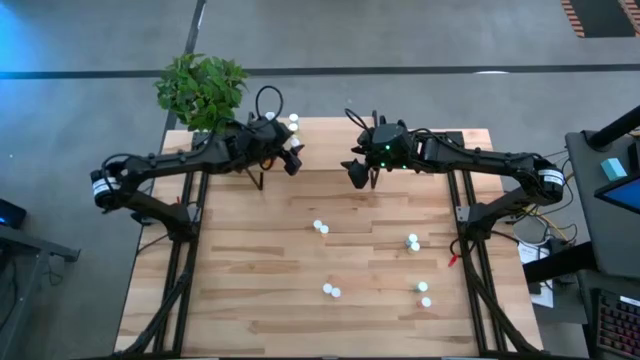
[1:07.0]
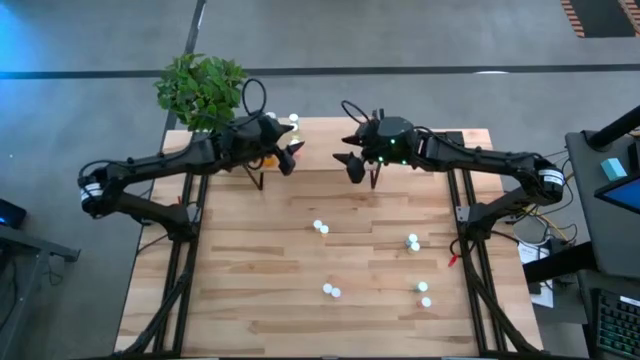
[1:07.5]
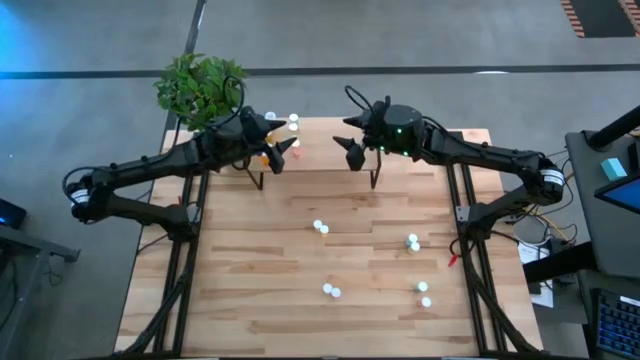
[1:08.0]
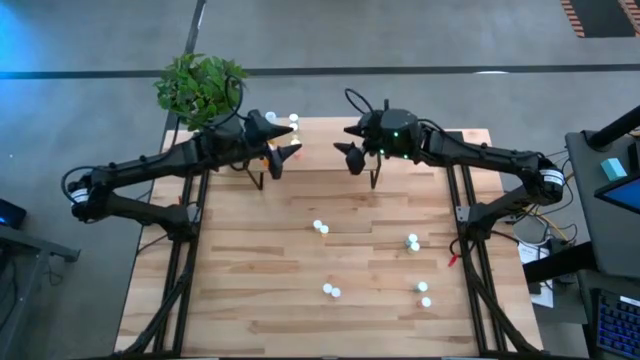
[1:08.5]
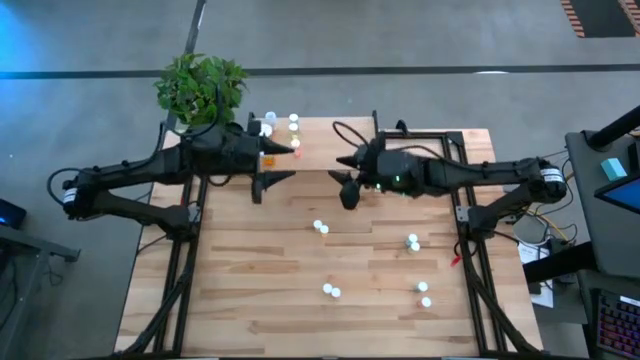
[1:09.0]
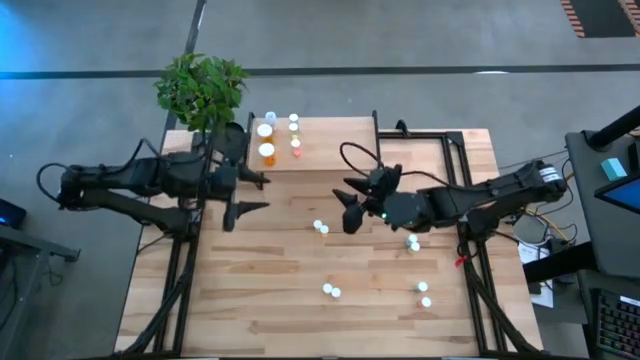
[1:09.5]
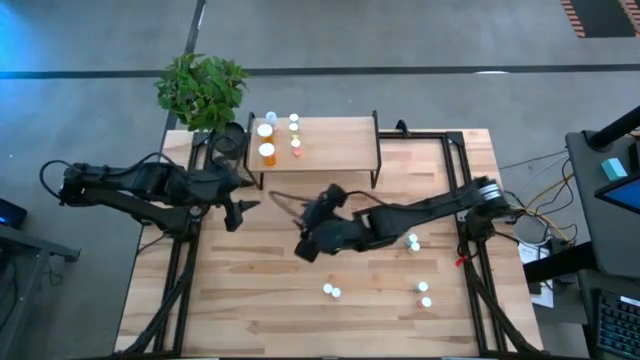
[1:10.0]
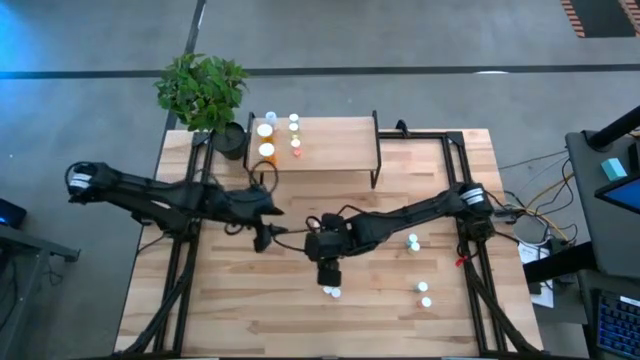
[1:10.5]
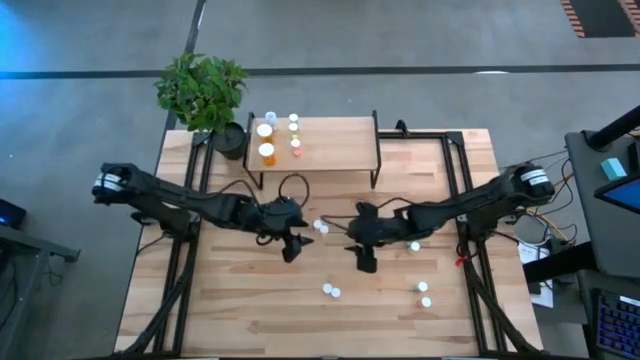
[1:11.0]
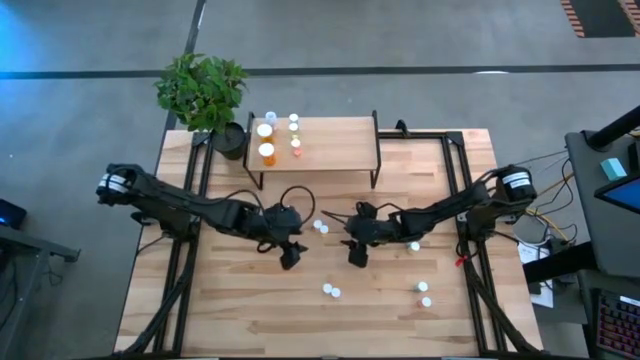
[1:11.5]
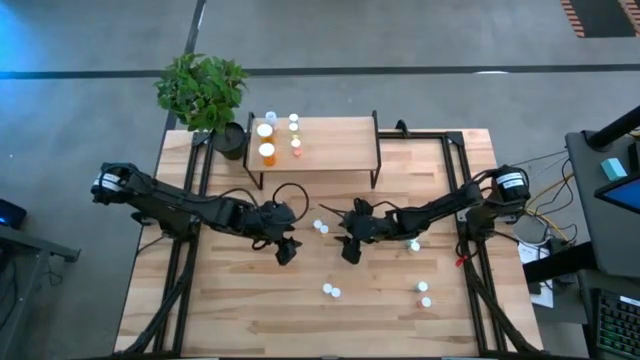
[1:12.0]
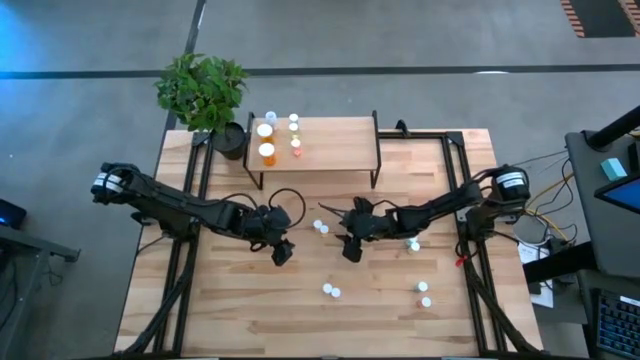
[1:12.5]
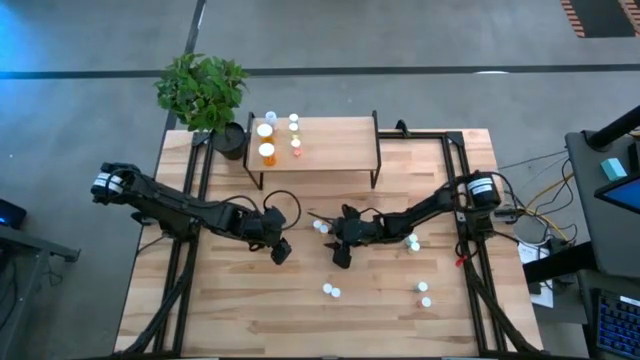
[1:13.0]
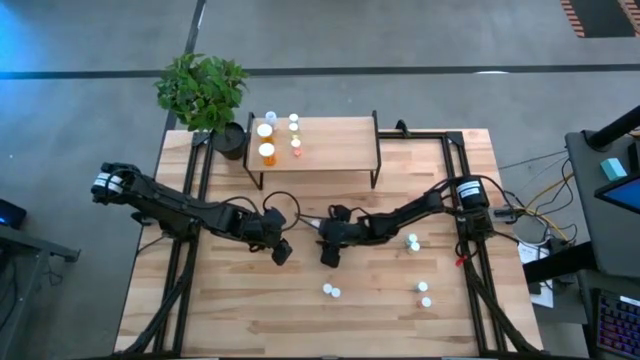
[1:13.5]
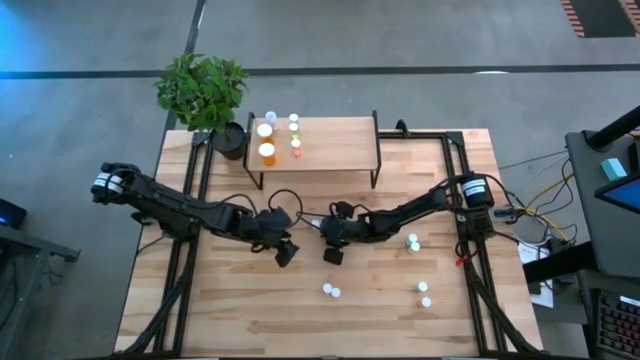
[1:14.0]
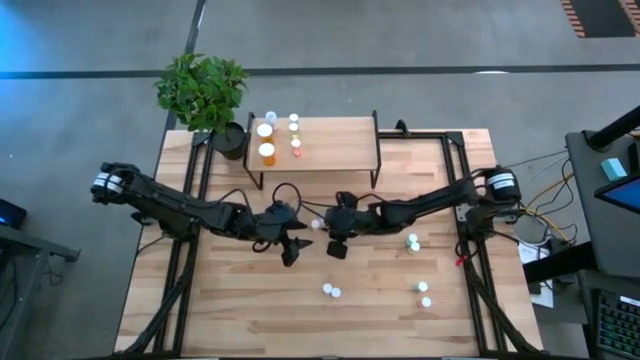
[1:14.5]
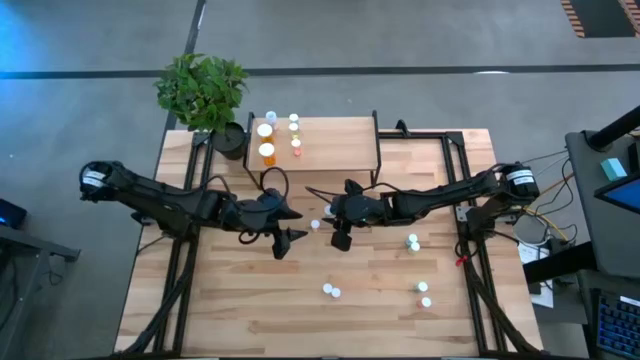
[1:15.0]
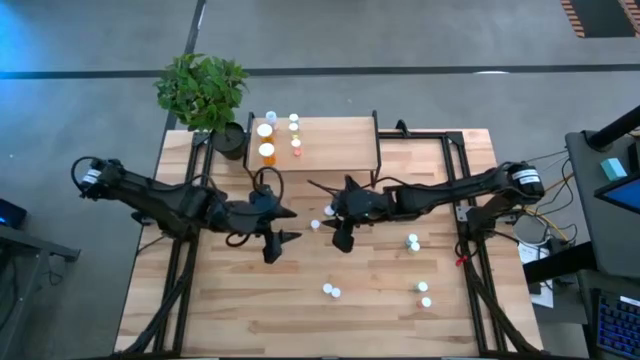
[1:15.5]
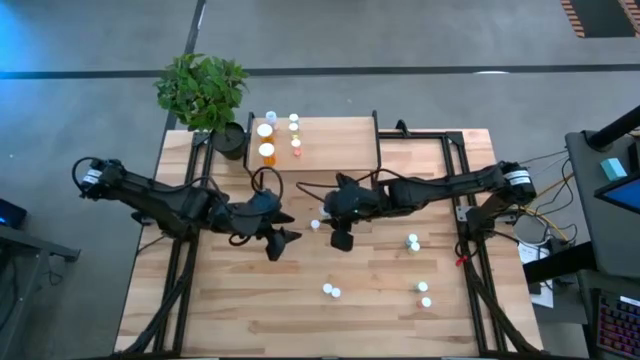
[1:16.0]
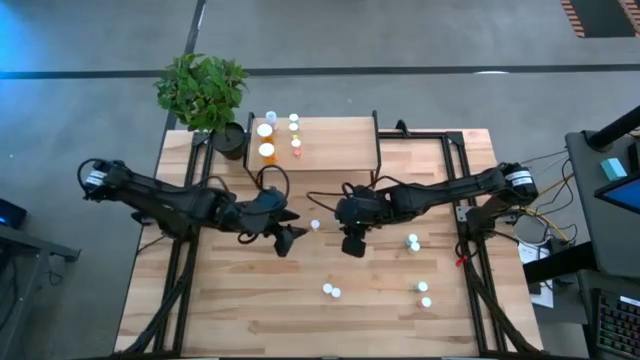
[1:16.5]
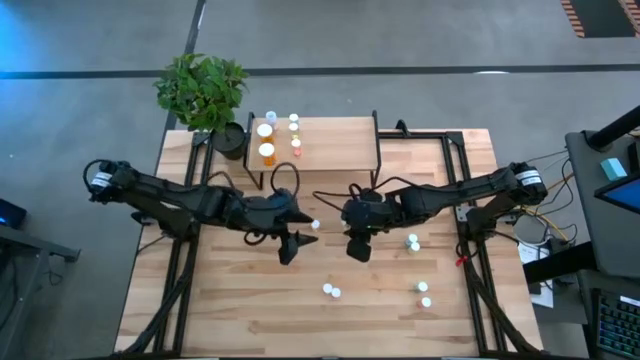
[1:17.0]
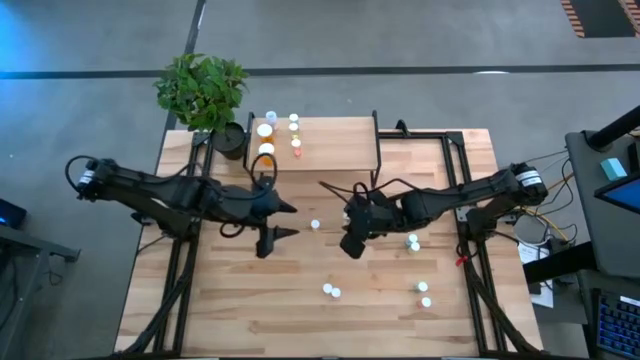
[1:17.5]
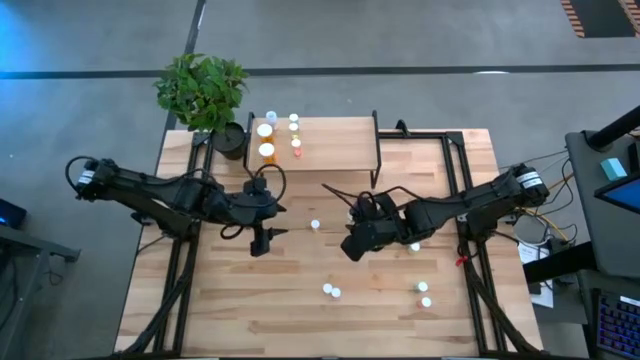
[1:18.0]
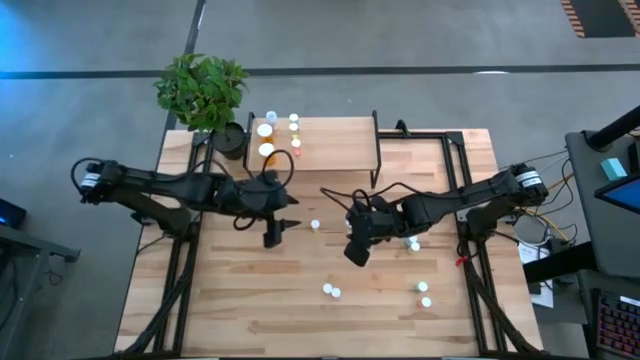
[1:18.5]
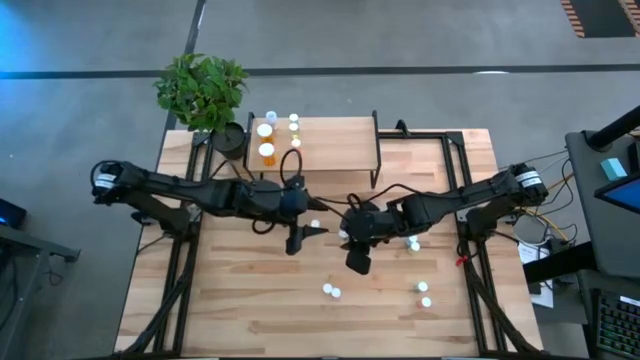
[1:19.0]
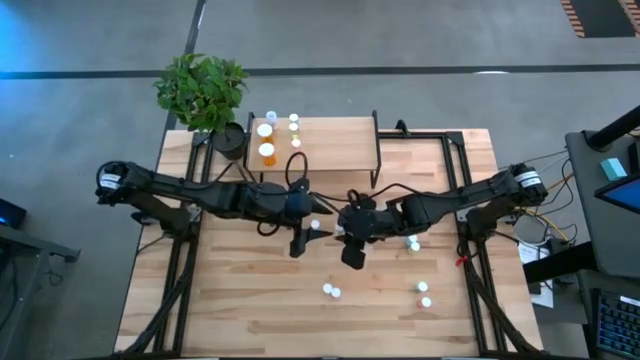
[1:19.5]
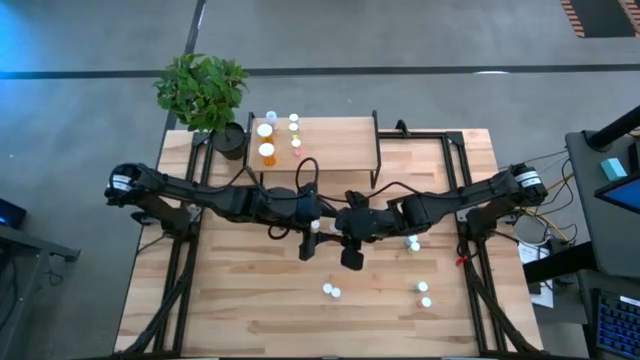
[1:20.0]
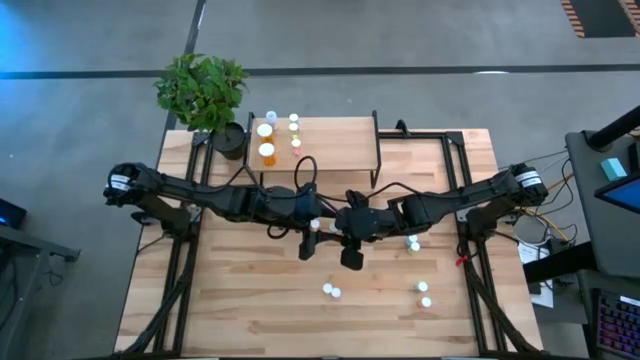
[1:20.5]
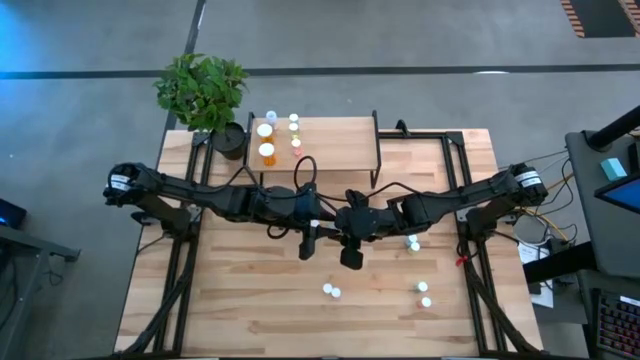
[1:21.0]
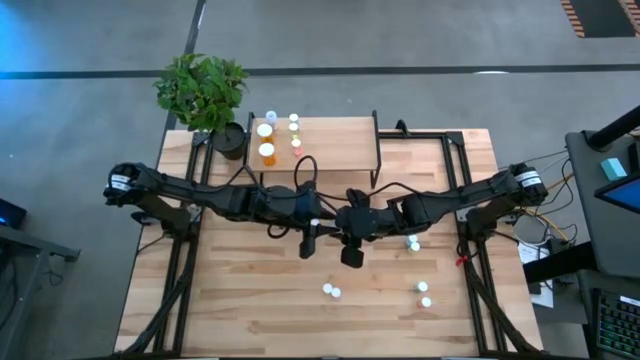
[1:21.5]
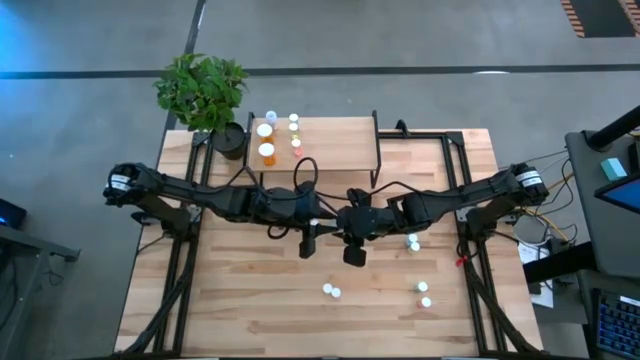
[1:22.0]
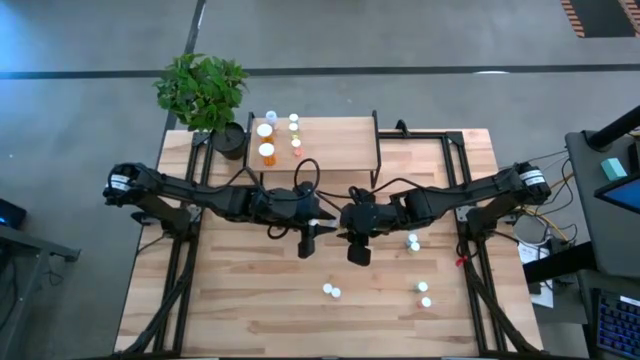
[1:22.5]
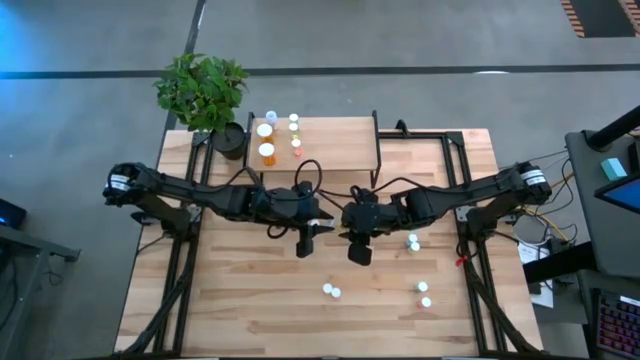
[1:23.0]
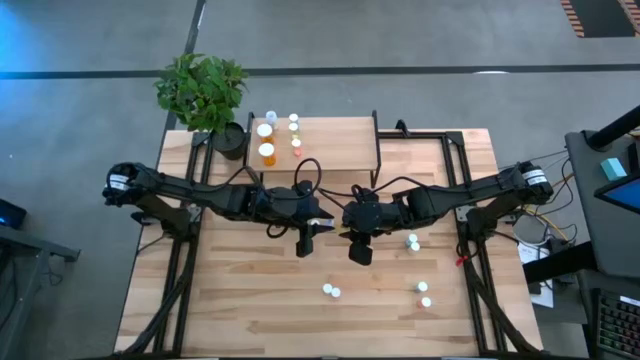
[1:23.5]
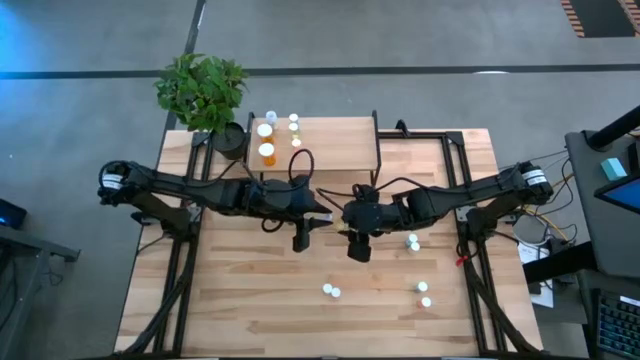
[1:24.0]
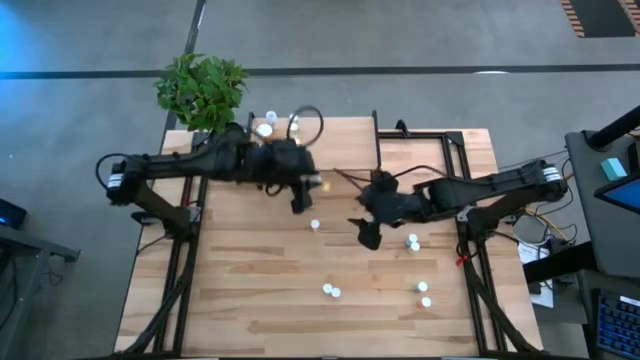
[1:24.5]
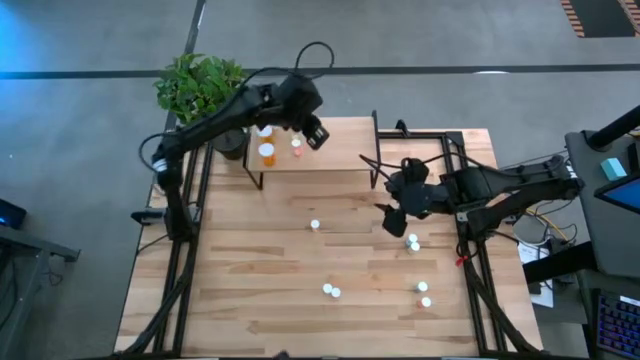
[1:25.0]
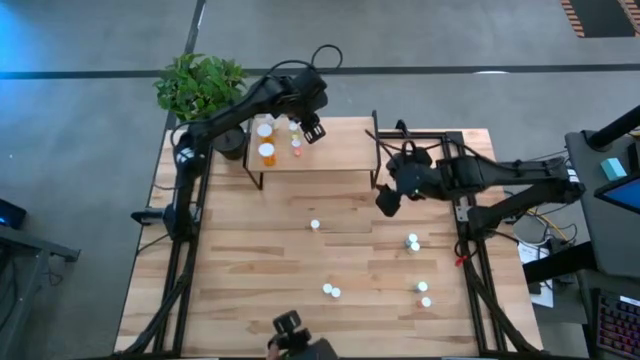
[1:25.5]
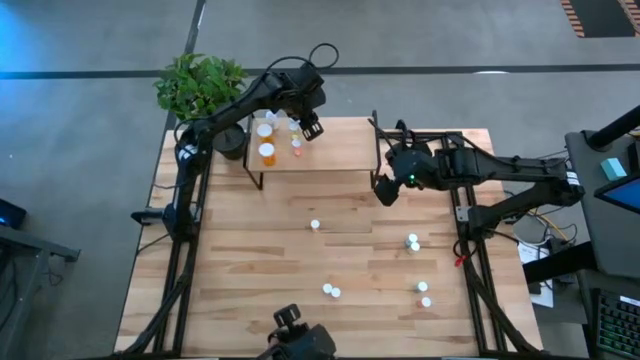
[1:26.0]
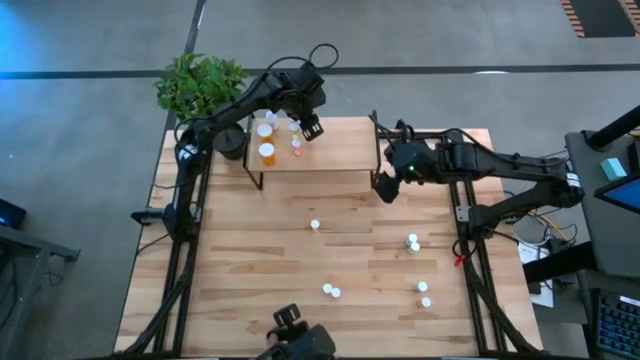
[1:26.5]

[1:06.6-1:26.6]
Task: Pick and place medicine bottles onto shelf by color
Put the yellow pill bottle on the shelf

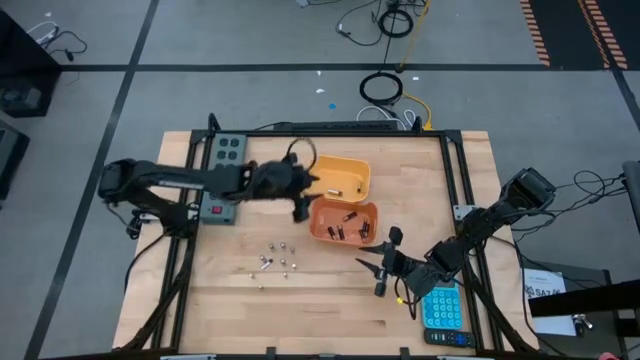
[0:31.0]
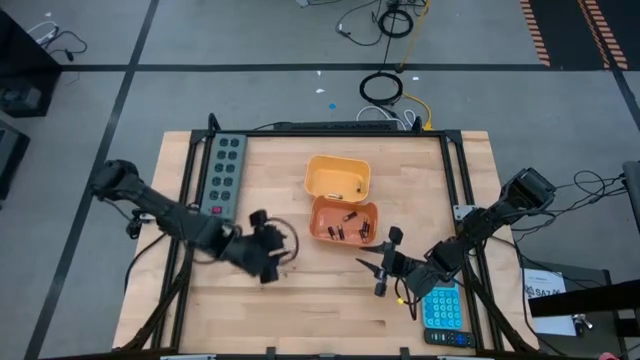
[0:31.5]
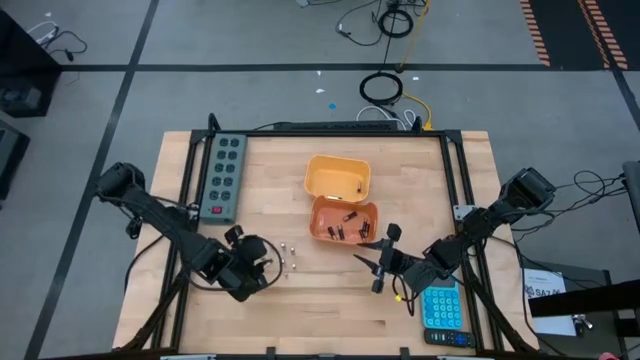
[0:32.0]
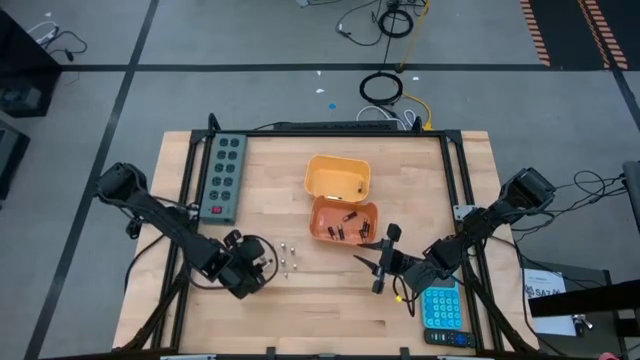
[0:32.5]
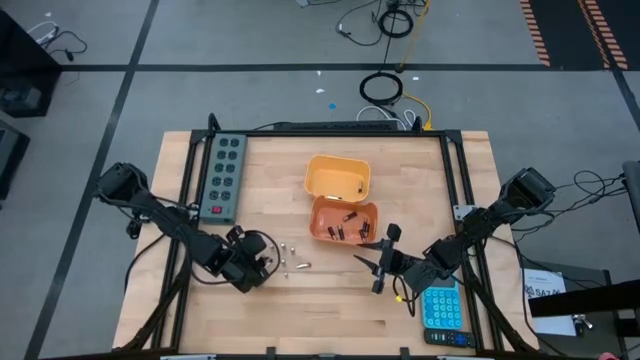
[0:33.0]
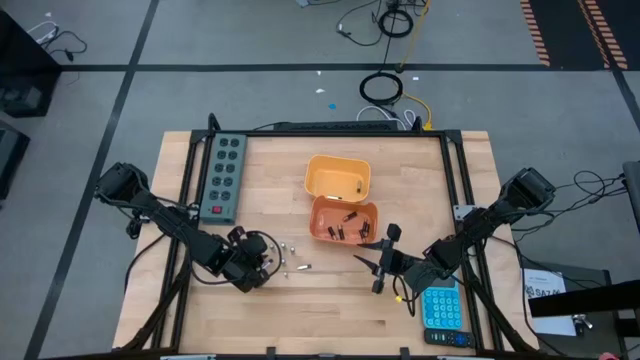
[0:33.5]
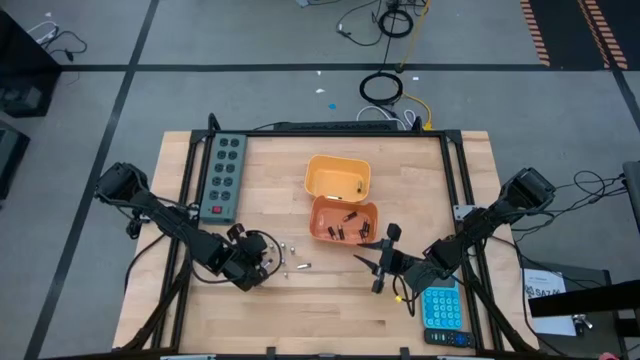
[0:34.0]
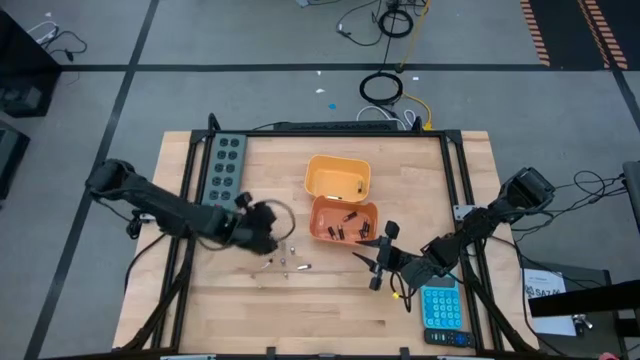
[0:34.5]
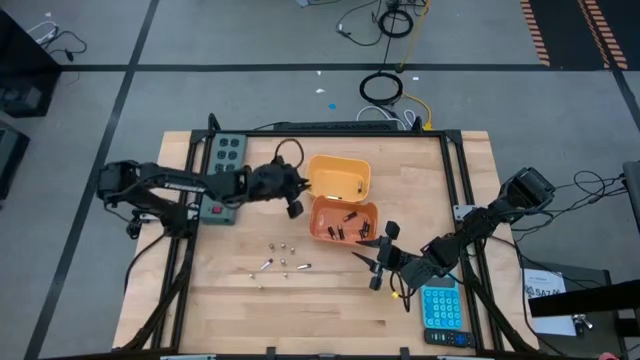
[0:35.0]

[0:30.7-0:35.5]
Task: Sort batteries
Put the silver battery into the yellow bin
